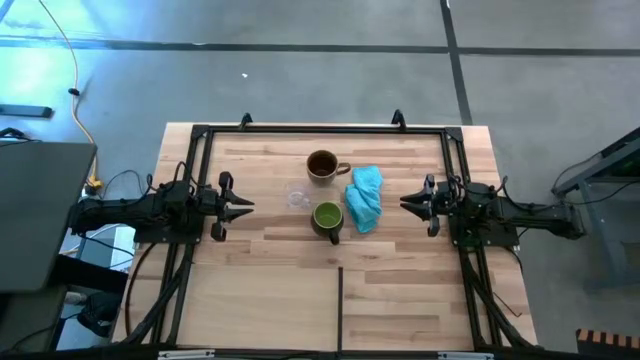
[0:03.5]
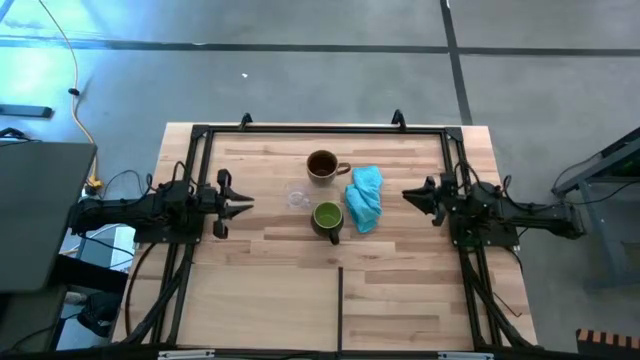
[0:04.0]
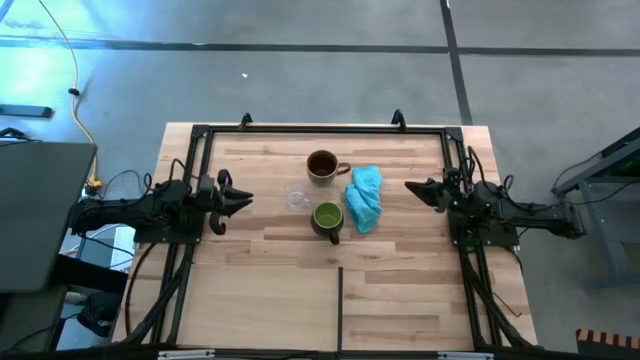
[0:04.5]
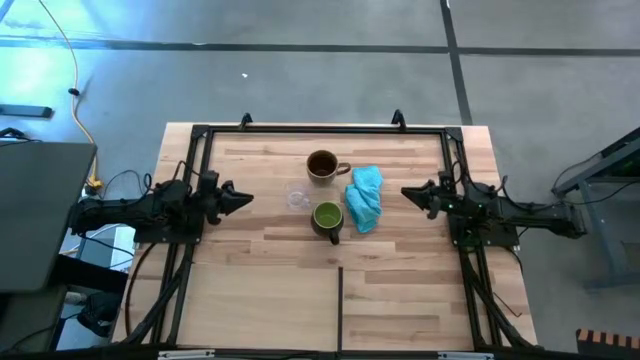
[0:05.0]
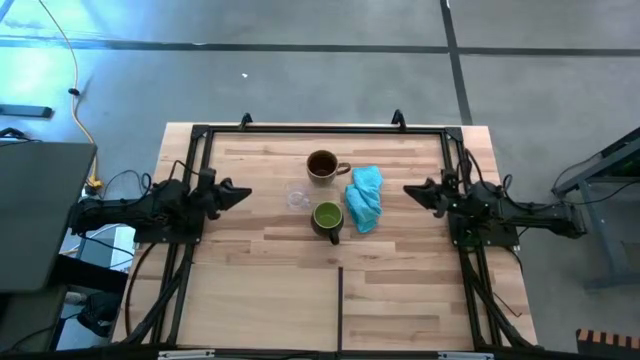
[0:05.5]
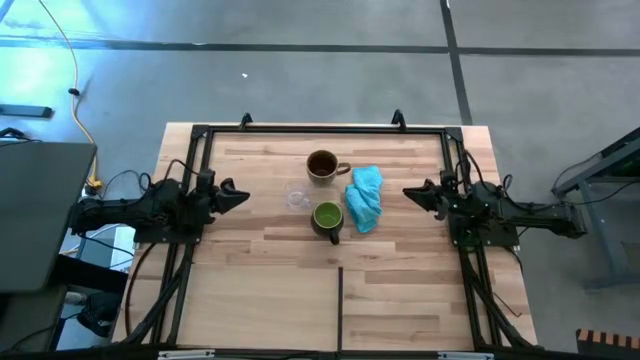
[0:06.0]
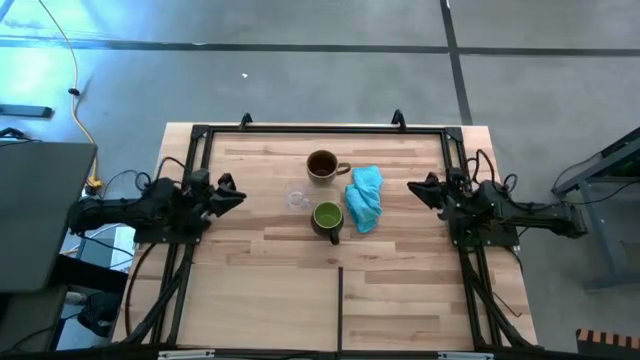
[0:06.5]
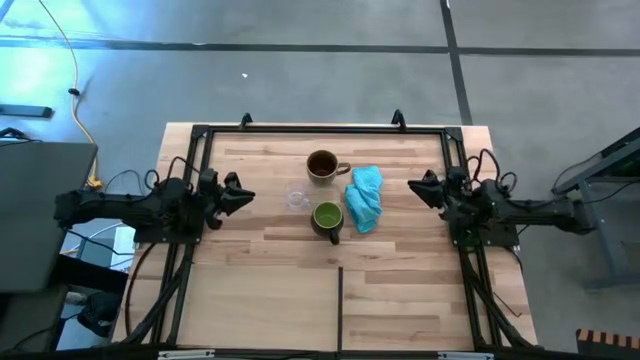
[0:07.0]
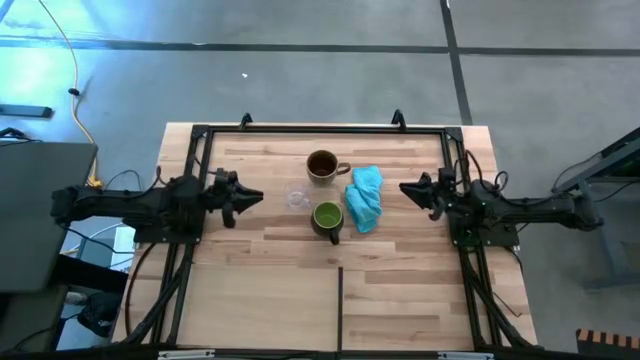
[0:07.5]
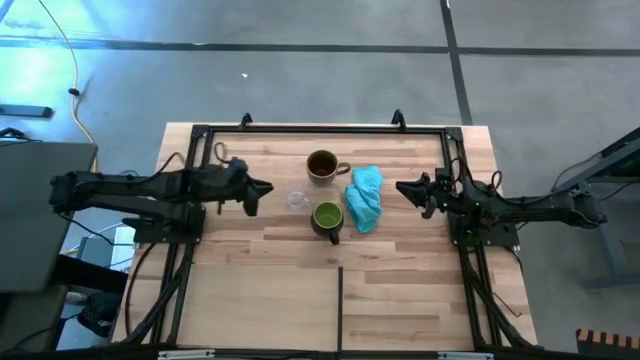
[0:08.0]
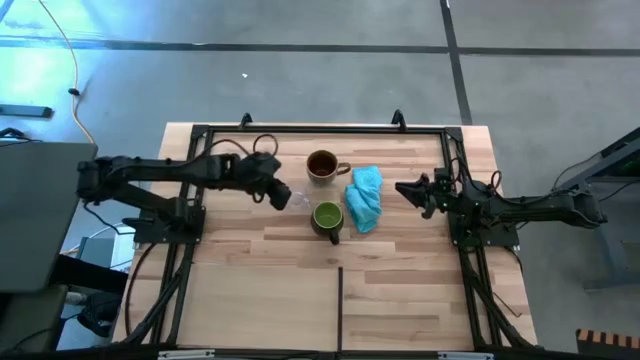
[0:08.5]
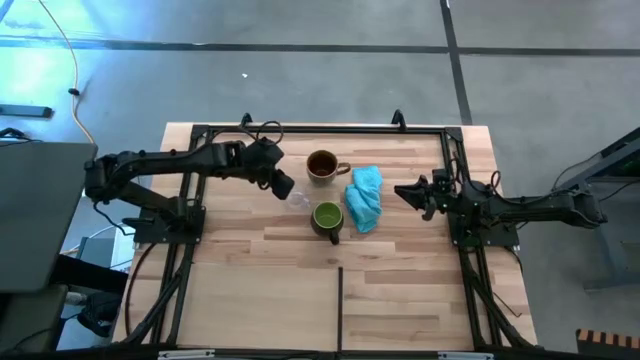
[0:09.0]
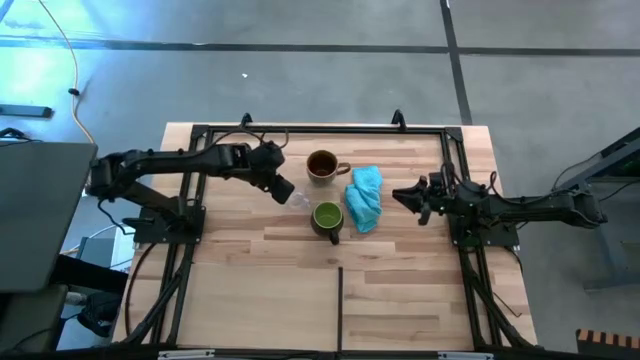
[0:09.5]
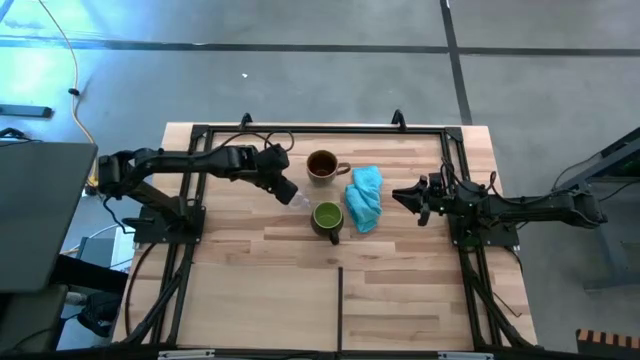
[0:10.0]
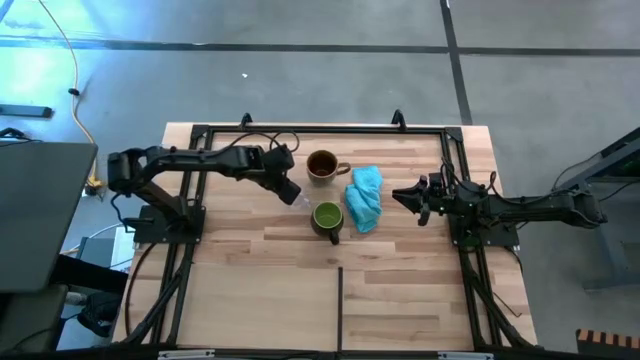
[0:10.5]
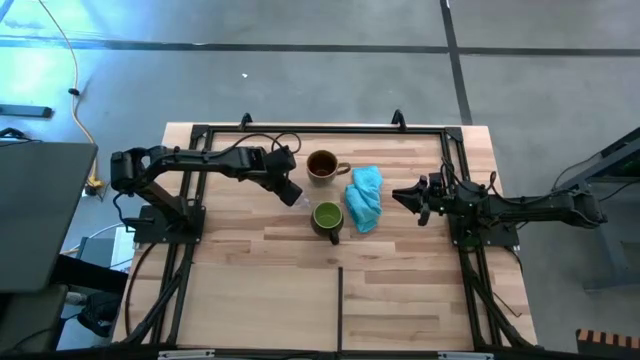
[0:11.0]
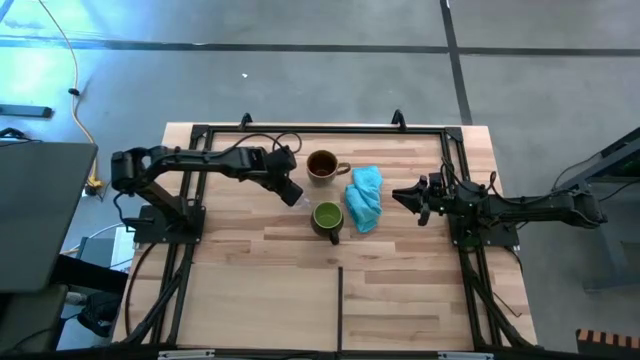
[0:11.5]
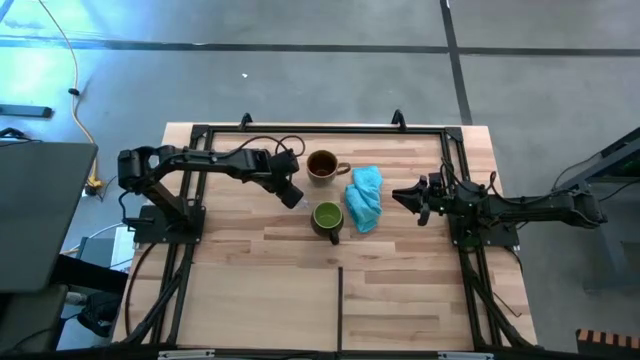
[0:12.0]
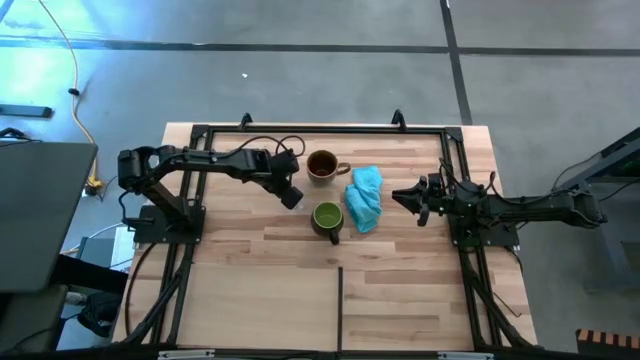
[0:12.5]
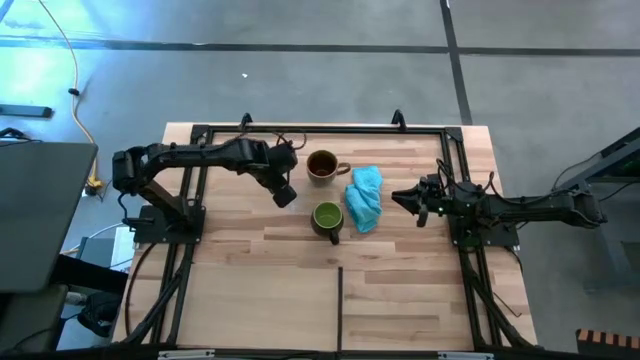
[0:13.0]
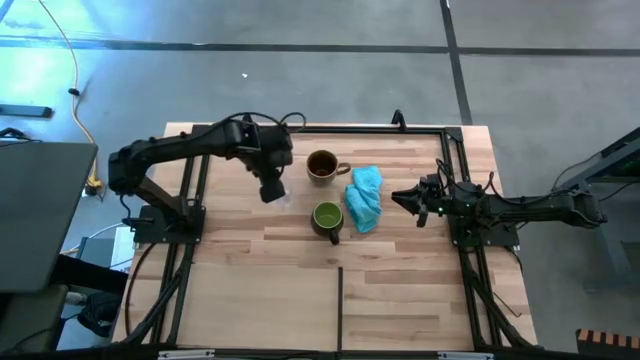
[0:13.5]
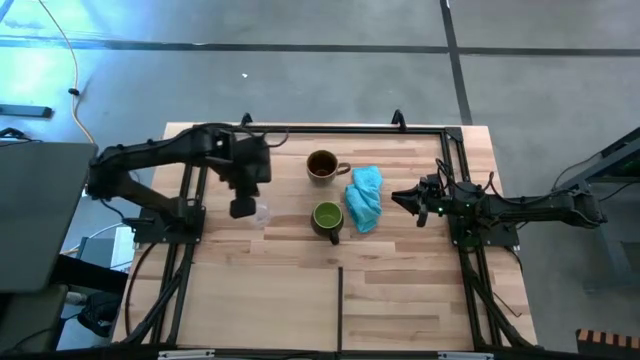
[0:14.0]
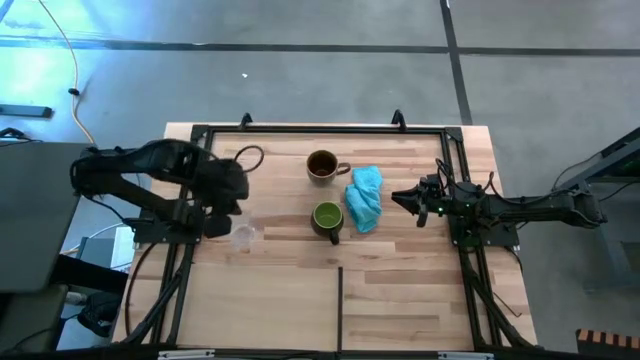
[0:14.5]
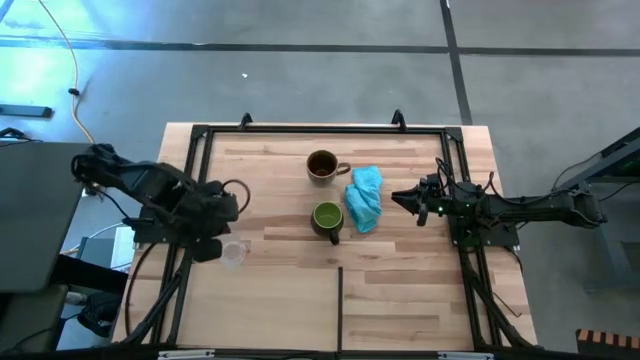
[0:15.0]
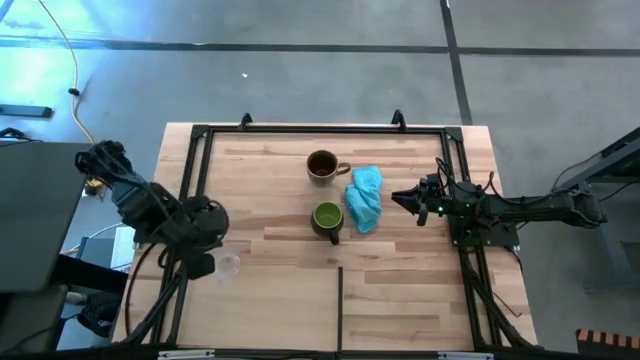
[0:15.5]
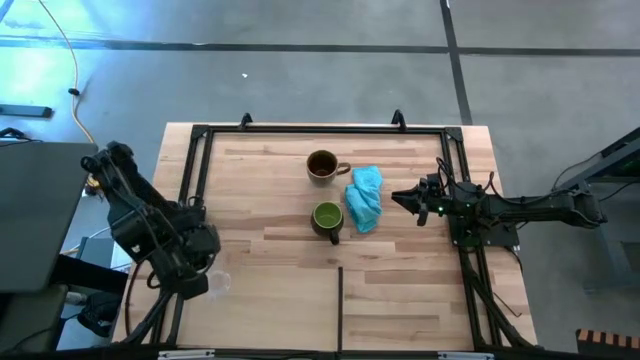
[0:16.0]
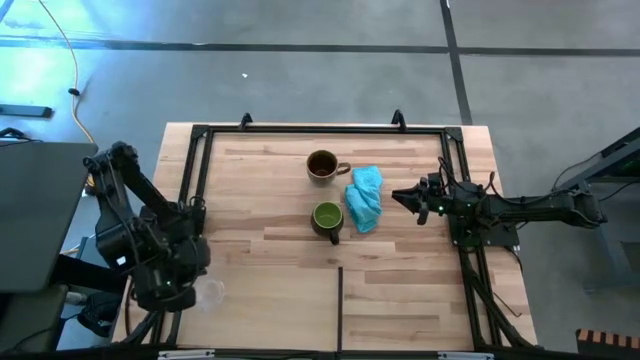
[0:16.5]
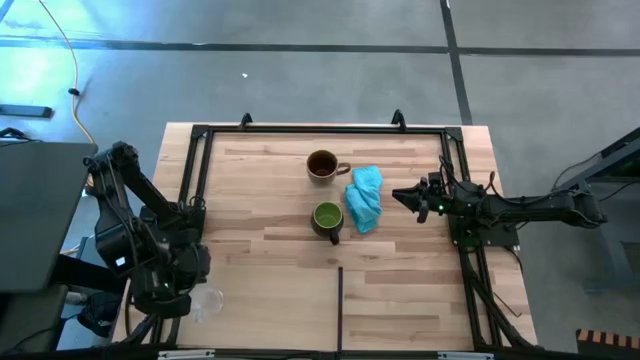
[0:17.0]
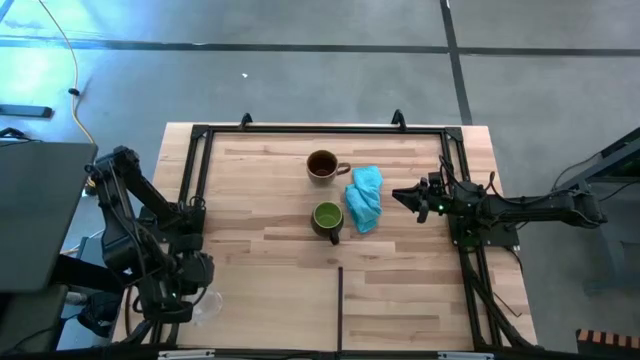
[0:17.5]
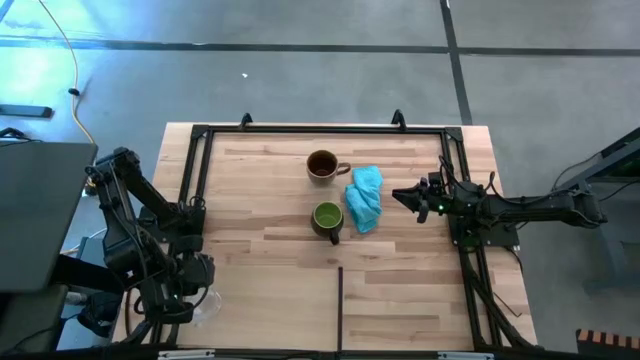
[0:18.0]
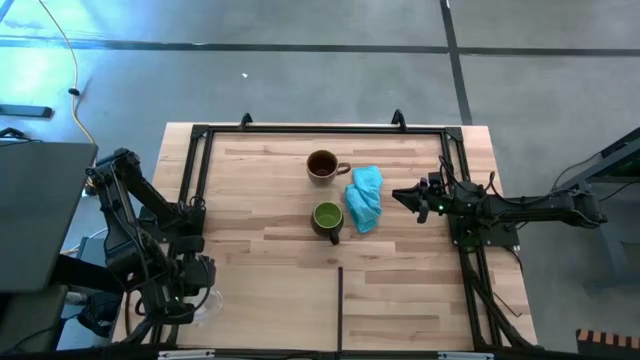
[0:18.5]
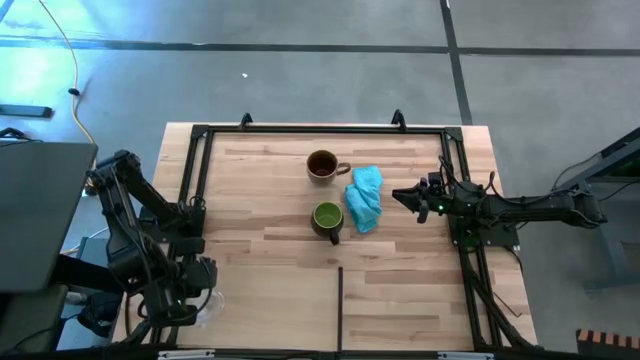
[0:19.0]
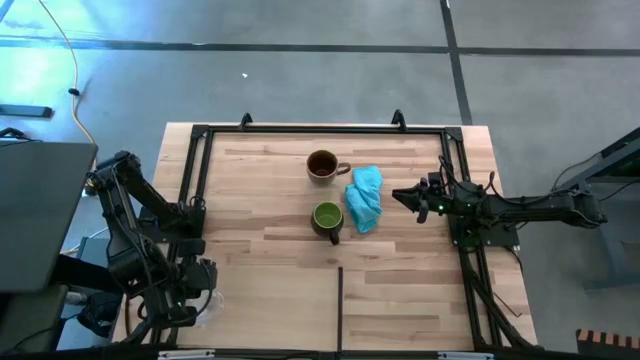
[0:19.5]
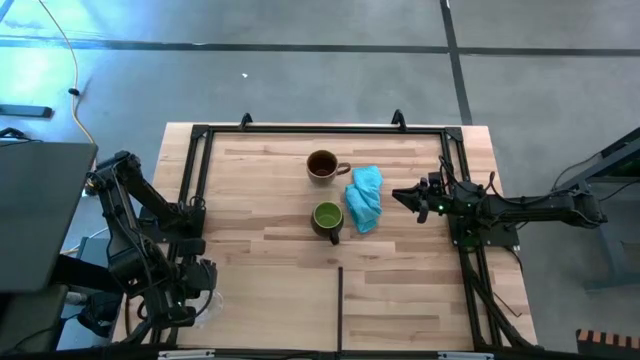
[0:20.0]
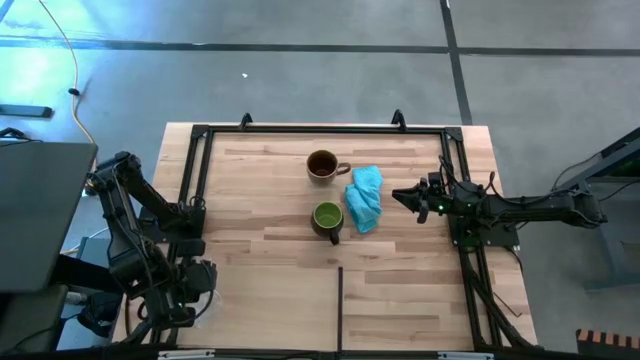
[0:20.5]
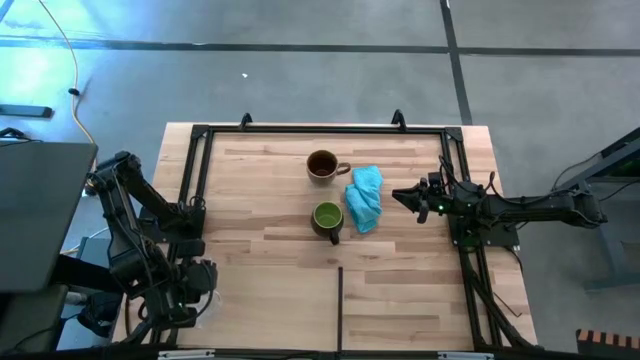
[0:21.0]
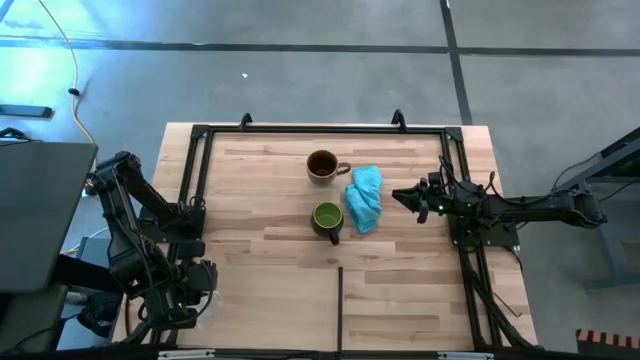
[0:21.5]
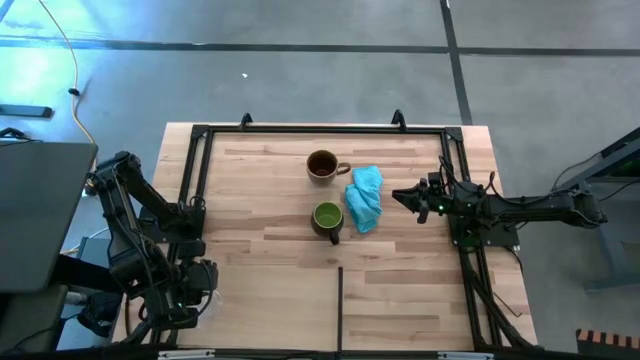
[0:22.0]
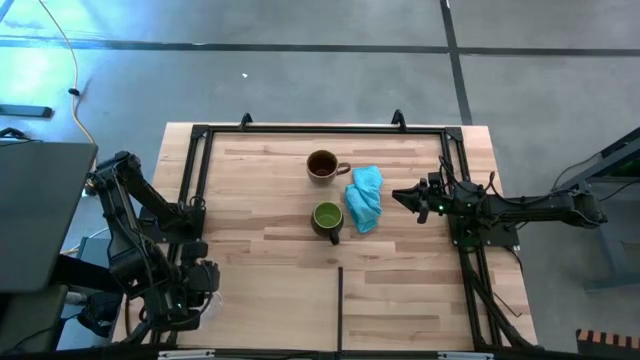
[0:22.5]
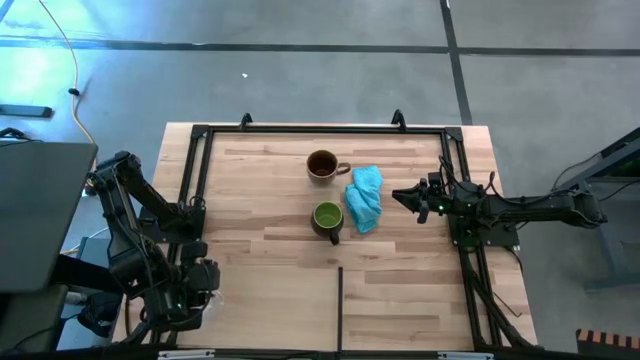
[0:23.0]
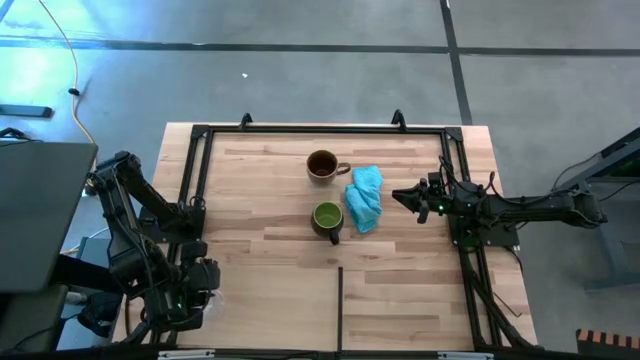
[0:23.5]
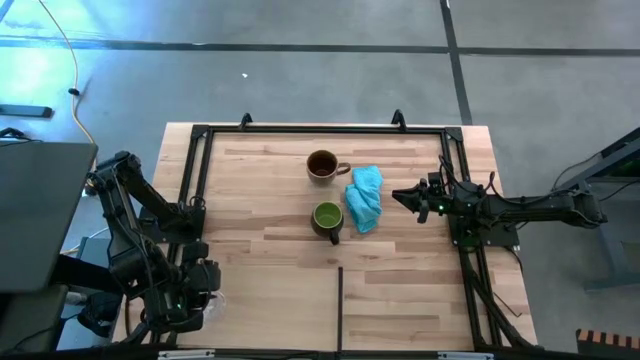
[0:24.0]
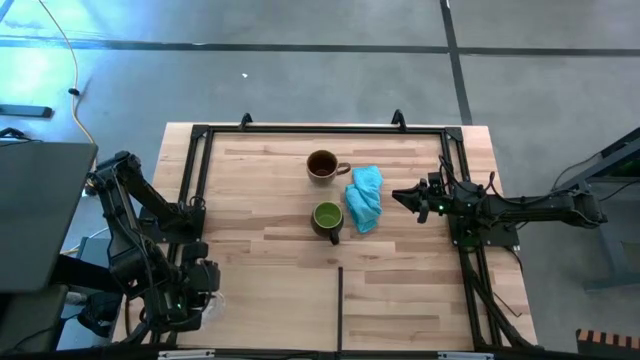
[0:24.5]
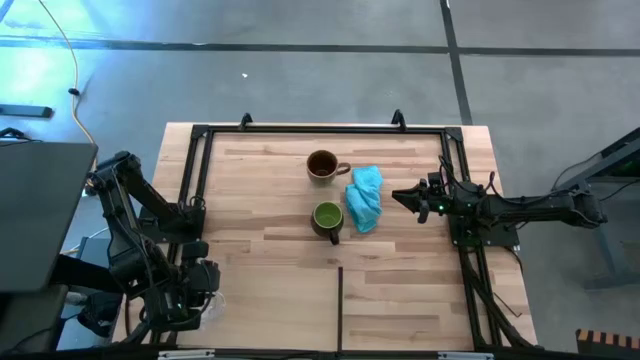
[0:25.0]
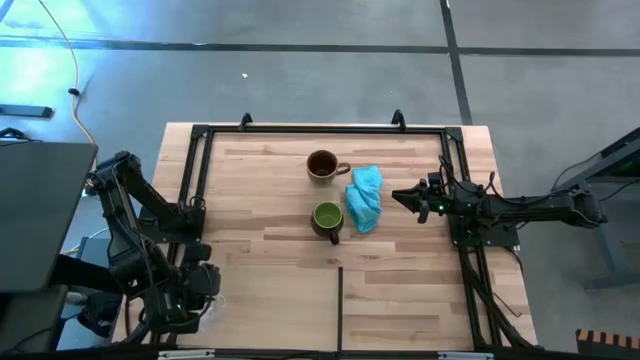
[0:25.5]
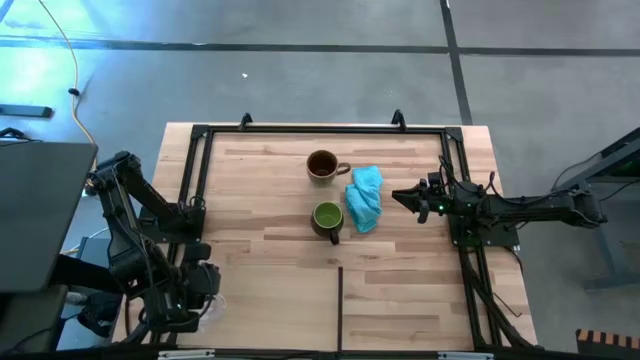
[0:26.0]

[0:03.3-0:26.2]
Task: Stack small to large cups/mugs on shelf
Put the transparent mug on the shelf
